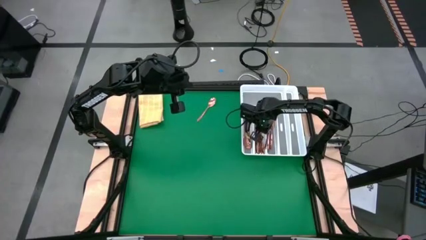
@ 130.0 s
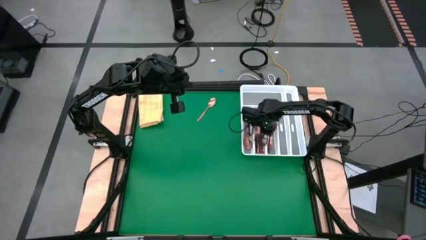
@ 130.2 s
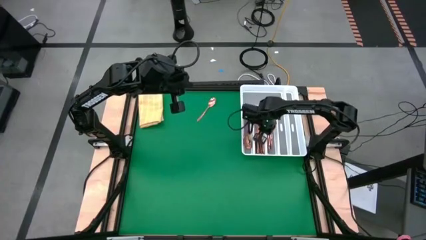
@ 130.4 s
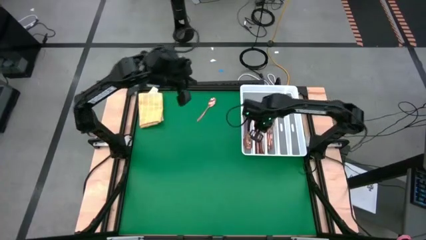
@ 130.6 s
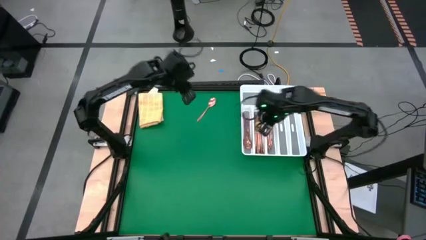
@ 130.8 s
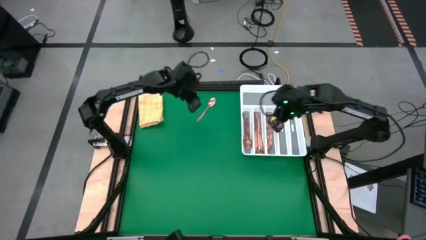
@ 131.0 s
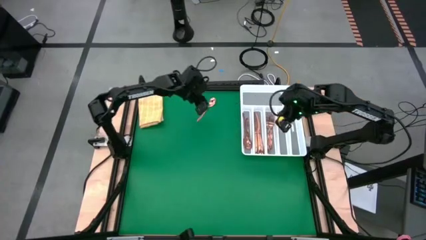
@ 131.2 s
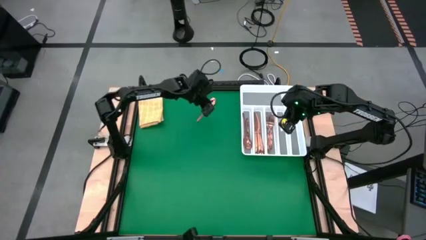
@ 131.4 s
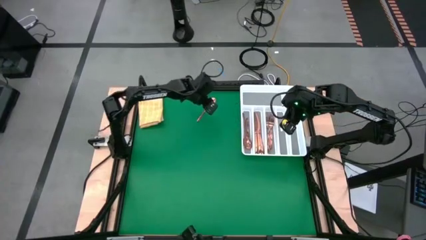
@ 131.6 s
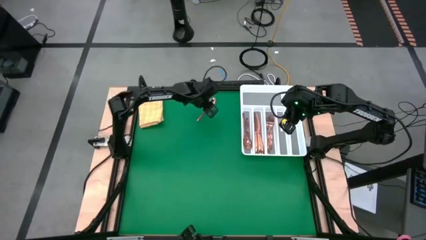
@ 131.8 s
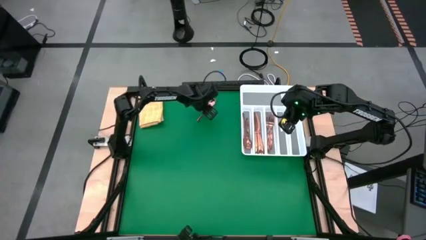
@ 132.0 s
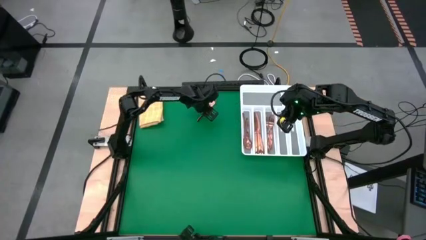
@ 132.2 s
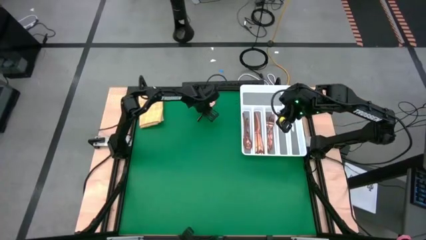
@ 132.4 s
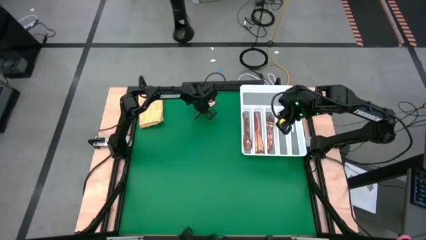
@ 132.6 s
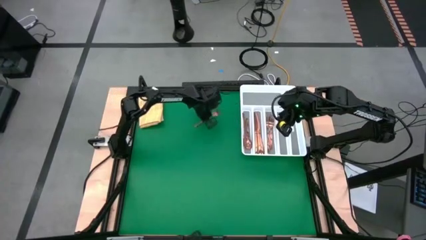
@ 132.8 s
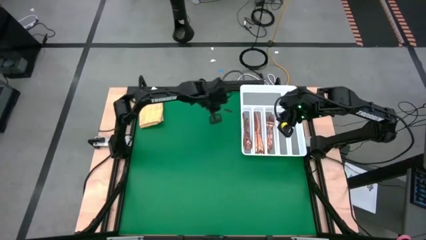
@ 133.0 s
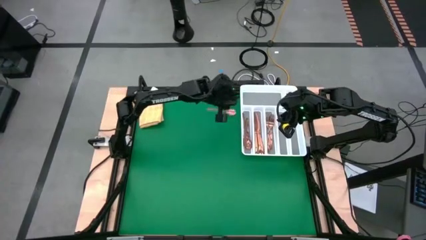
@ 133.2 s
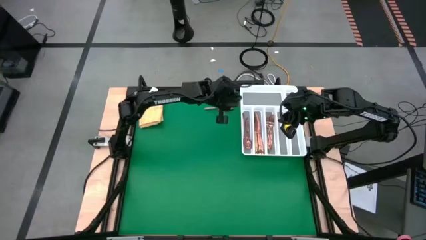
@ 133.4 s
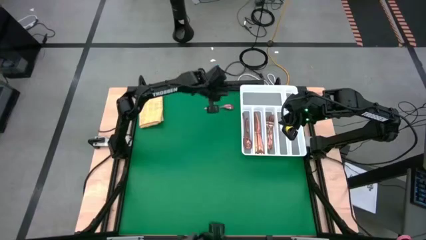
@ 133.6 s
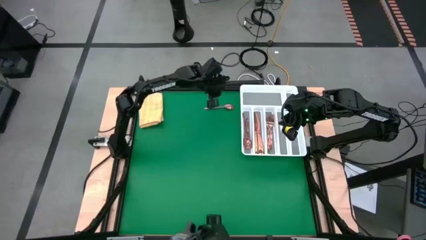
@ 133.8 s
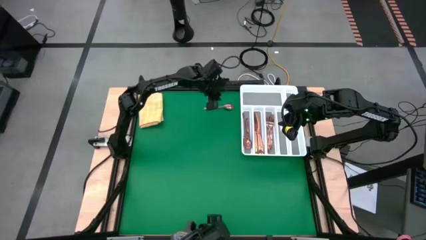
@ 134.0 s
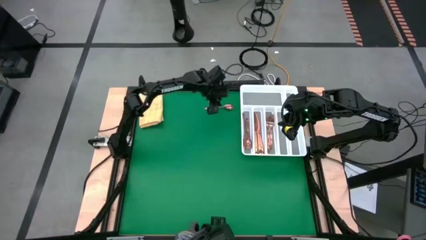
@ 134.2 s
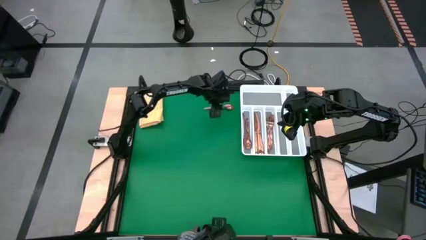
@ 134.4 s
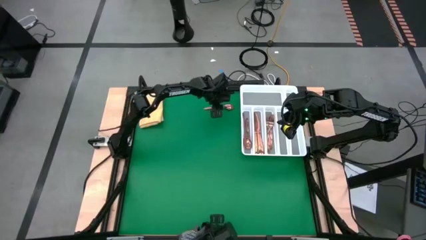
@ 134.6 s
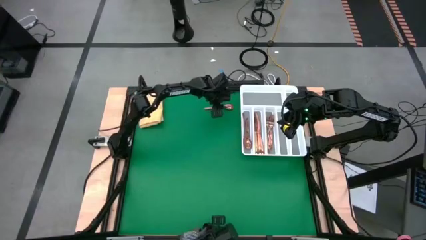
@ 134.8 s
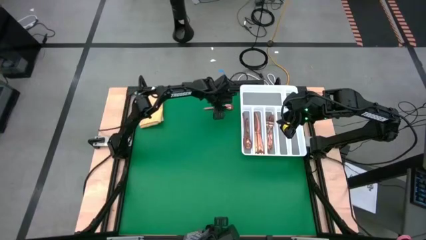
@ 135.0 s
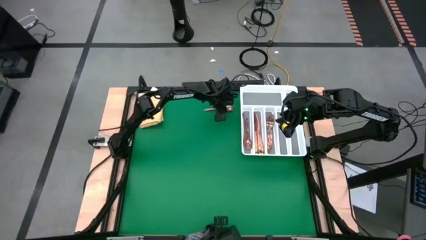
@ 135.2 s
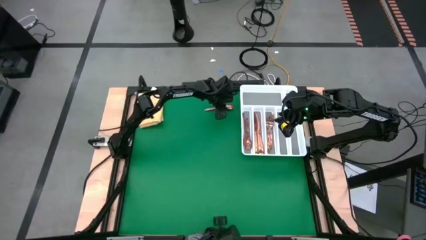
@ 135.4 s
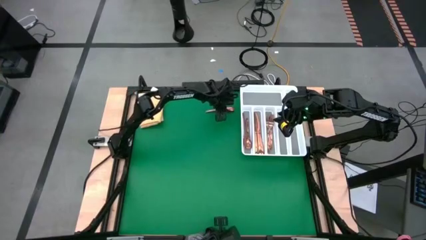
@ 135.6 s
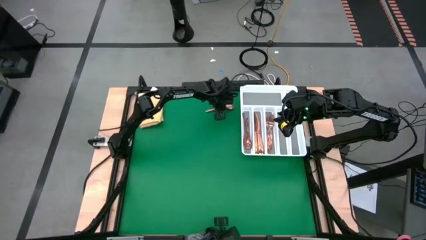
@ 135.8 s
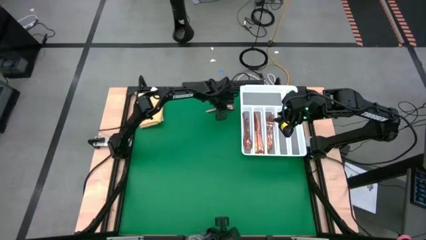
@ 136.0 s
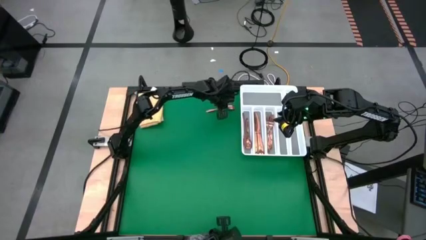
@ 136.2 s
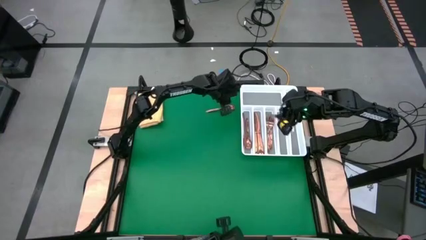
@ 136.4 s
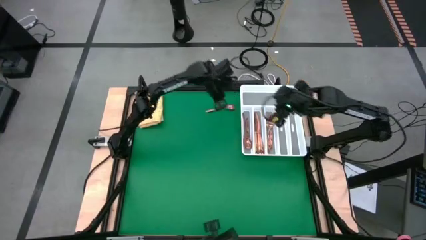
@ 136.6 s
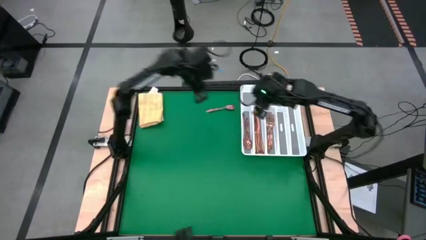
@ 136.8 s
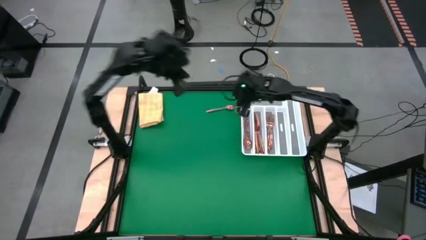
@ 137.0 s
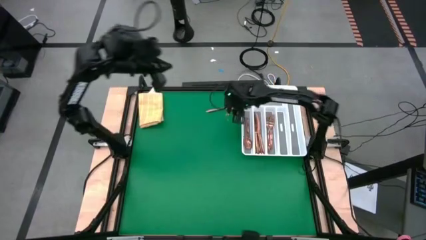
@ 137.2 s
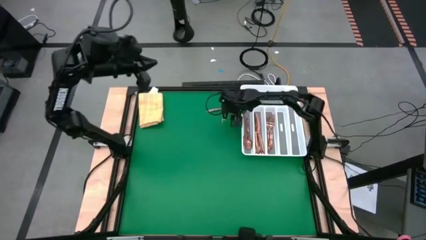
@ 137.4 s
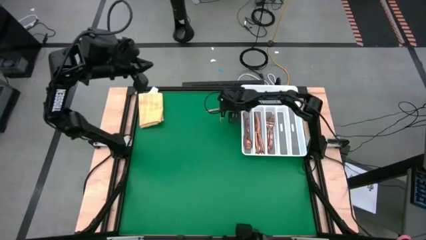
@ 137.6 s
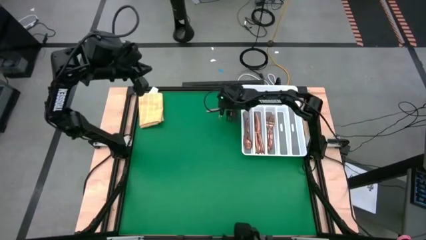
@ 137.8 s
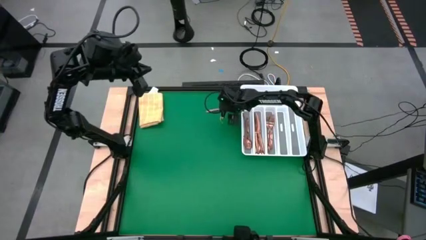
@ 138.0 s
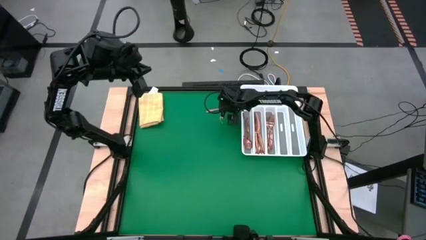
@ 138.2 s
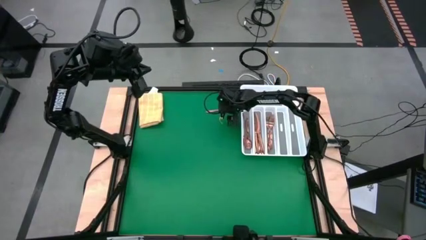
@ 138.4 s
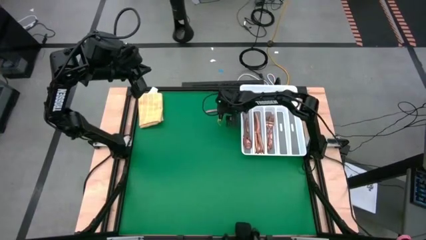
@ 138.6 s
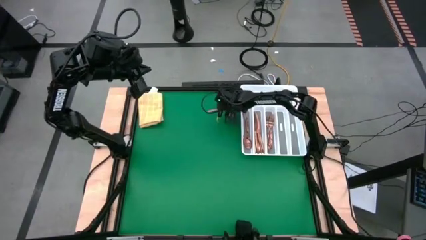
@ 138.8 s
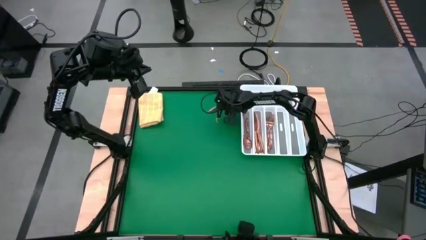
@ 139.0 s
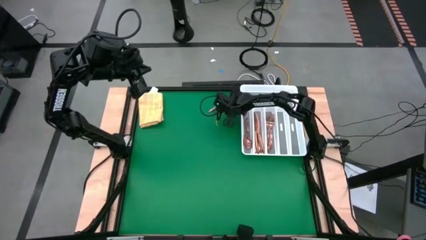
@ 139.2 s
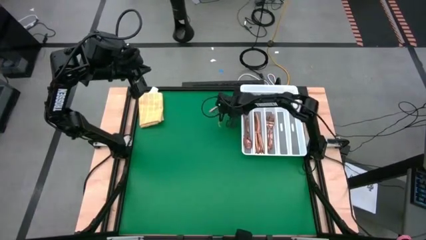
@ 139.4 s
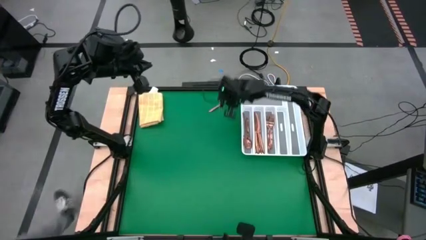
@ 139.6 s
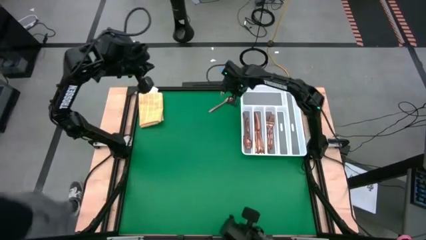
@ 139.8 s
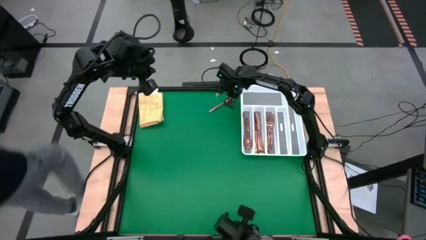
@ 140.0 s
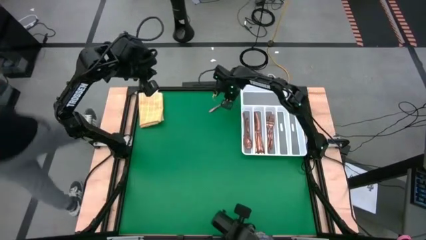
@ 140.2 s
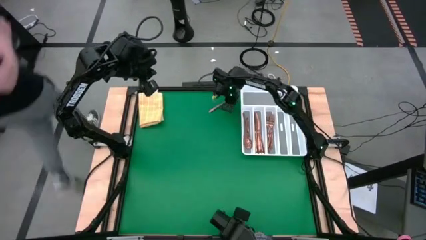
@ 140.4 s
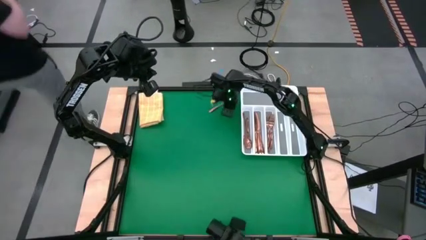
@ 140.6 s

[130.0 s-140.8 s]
Task: Sort silverware
Put the gold spoon into the silverware organizer

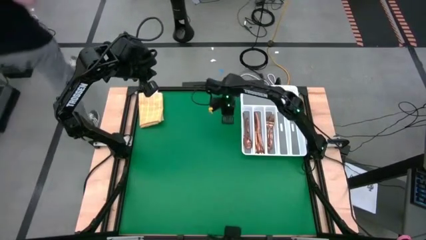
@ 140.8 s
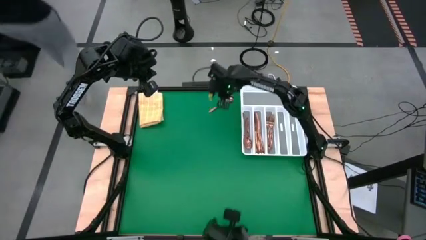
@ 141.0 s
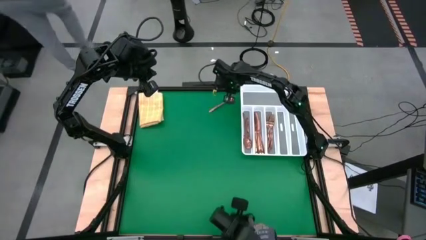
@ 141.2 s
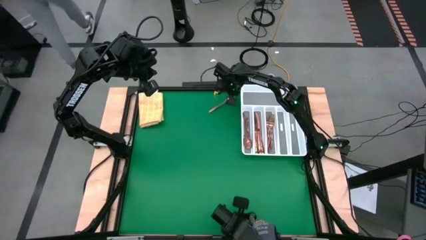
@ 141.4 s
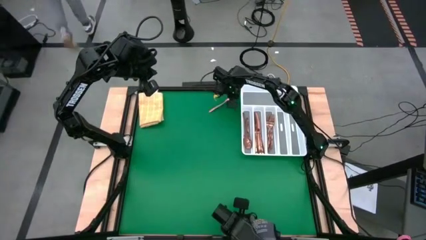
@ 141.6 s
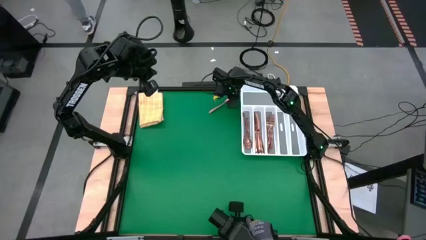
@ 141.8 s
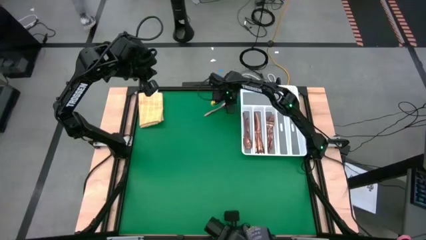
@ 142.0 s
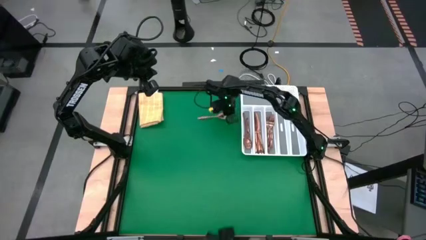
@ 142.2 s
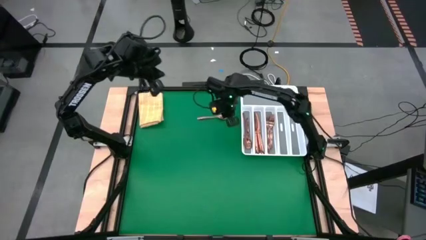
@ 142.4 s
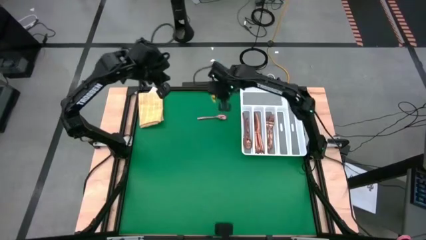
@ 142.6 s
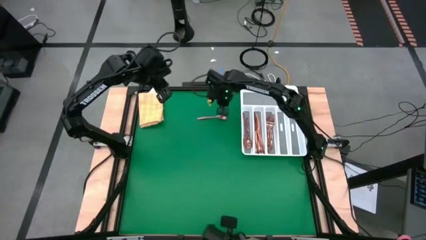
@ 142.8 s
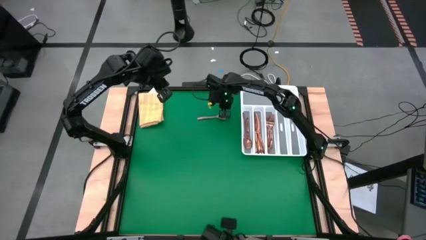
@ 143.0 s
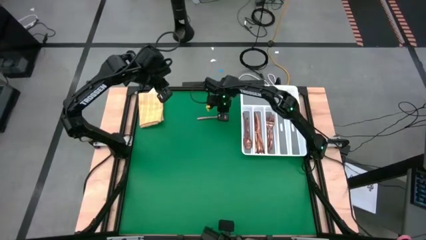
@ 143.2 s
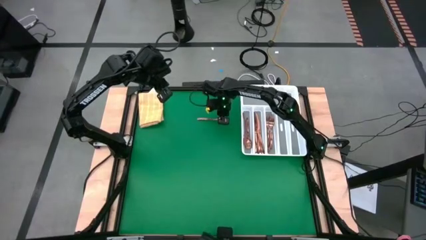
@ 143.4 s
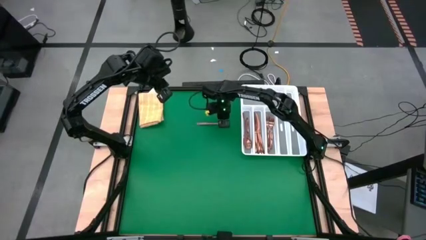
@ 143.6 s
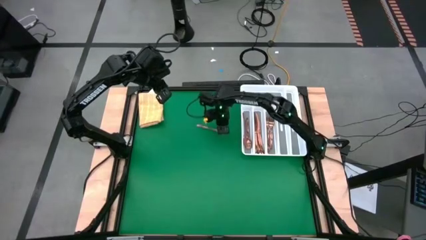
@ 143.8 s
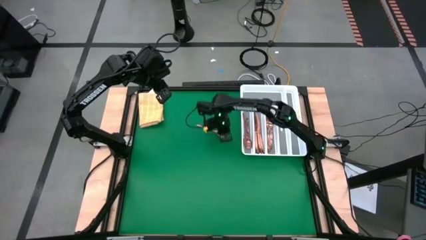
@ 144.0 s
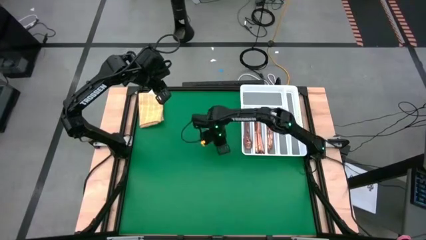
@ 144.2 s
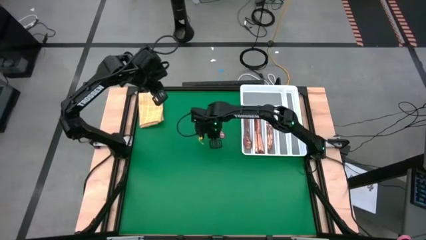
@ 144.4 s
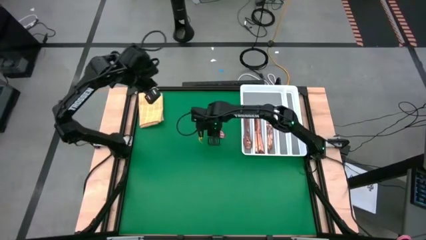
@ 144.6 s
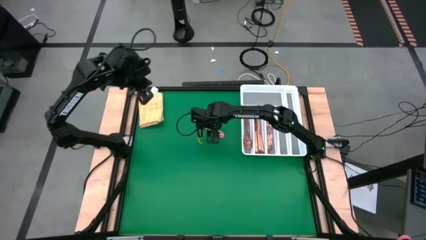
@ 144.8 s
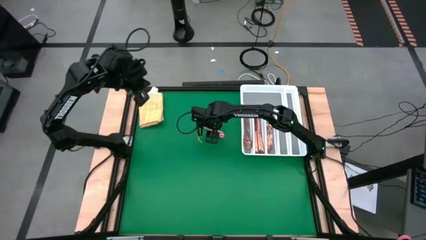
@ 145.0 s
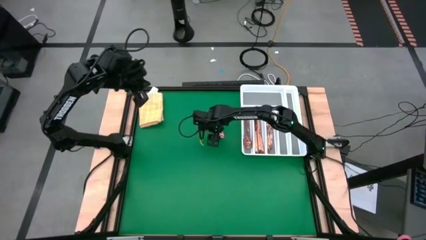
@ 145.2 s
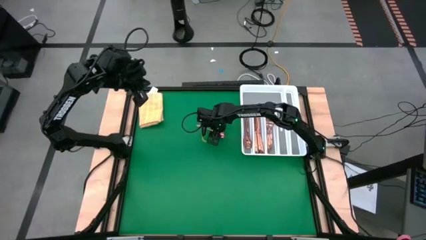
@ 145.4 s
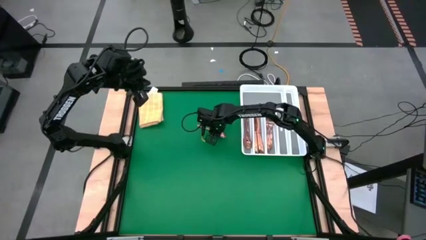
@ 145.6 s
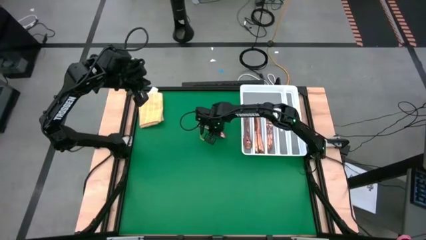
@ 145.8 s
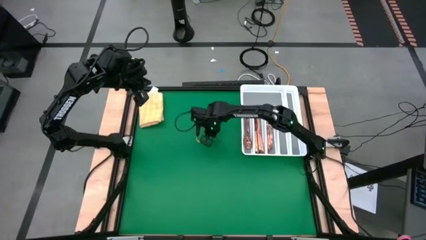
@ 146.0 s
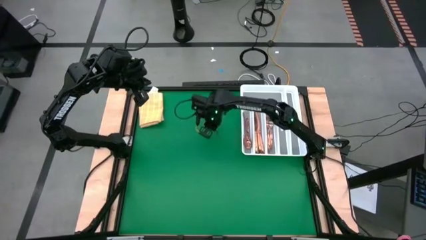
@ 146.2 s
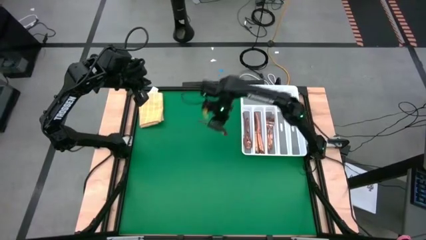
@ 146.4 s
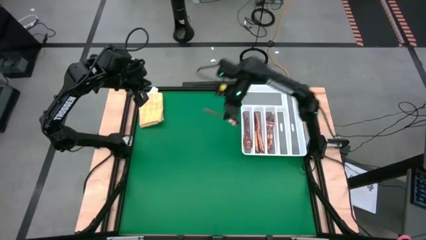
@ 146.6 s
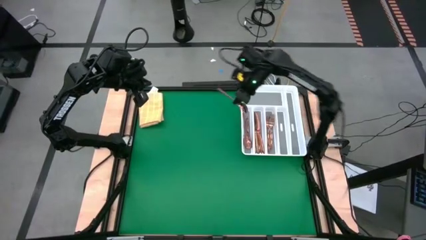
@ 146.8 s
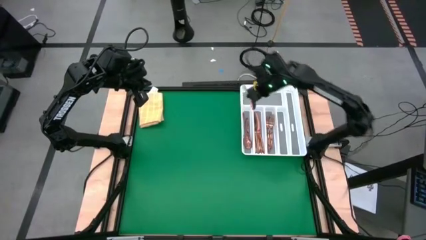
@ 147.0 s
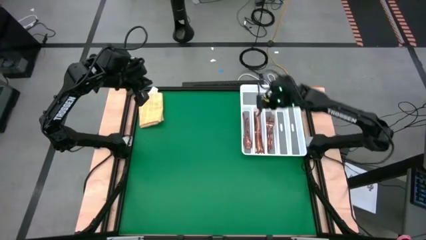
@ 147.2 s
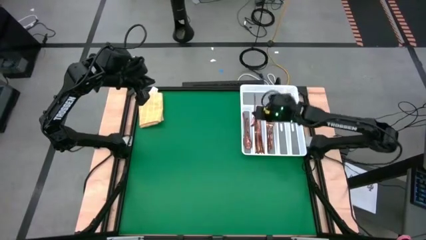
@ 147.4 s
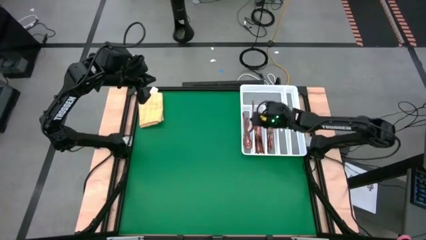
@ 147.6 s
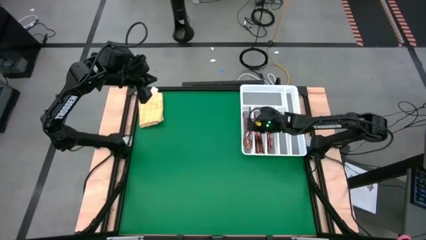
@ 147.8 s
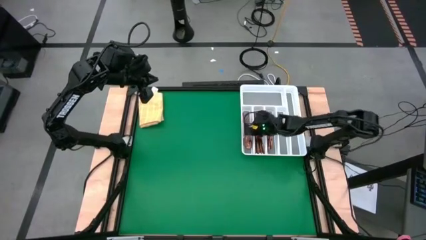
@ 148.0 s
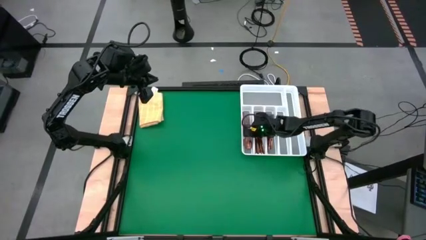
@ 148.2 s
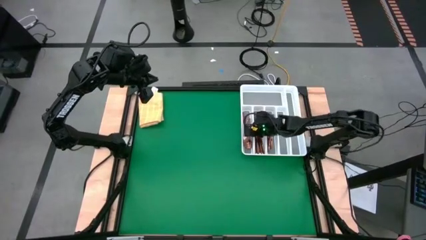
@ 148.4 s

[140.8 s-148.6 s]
Put the gold spoon into the silverware organizer
